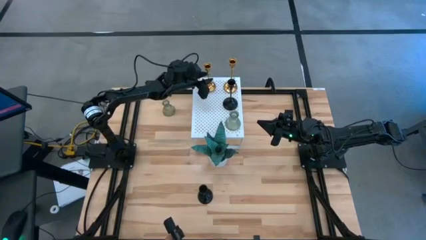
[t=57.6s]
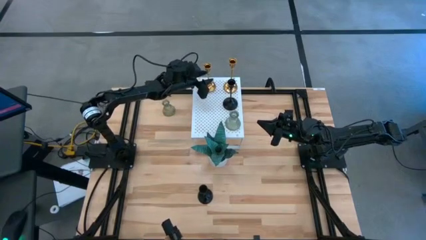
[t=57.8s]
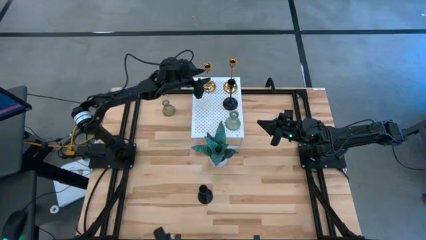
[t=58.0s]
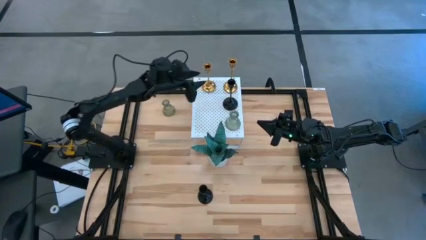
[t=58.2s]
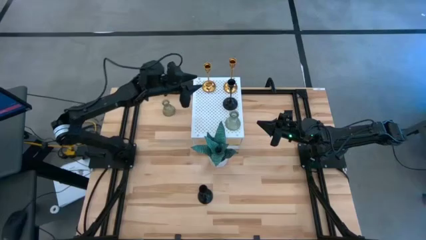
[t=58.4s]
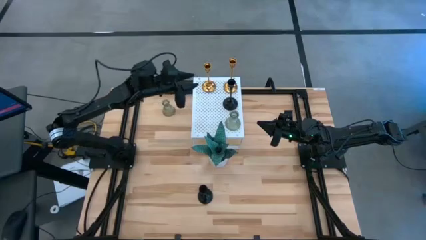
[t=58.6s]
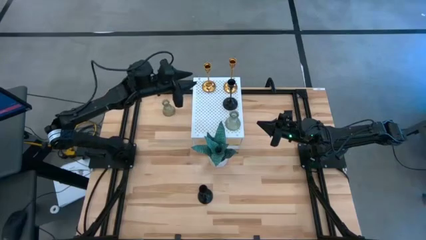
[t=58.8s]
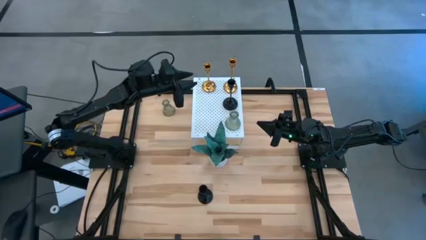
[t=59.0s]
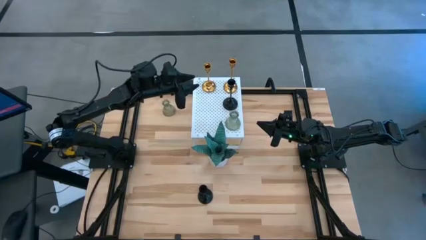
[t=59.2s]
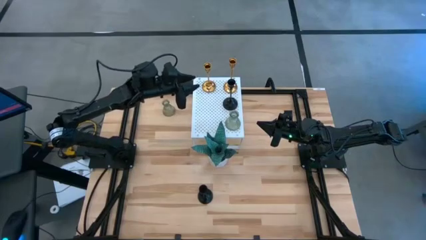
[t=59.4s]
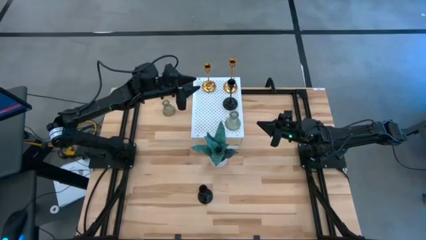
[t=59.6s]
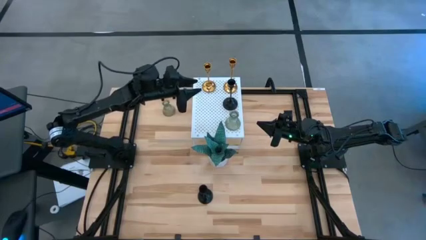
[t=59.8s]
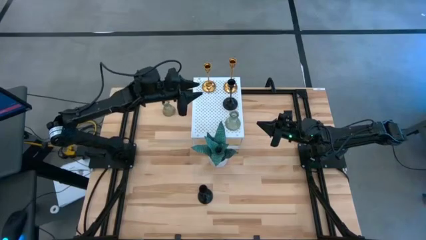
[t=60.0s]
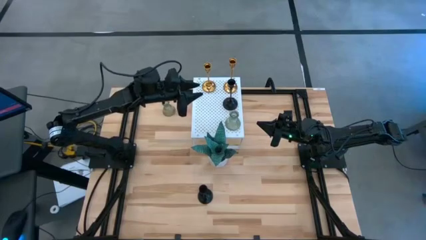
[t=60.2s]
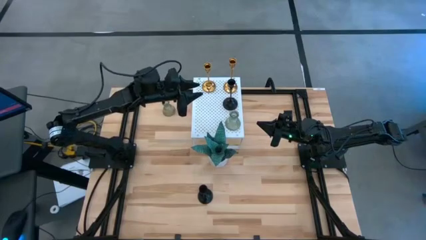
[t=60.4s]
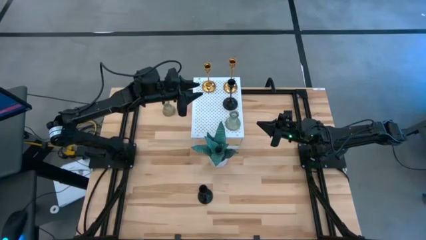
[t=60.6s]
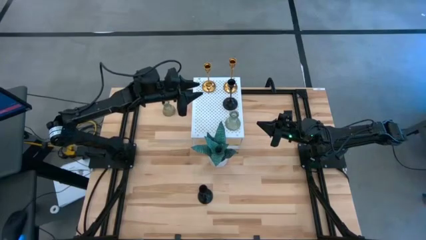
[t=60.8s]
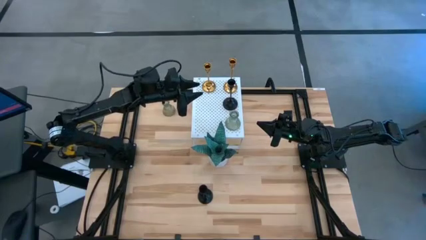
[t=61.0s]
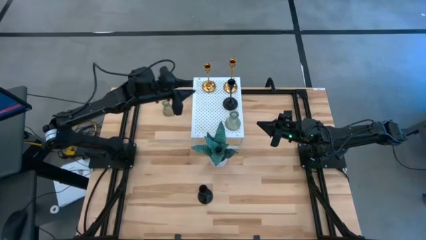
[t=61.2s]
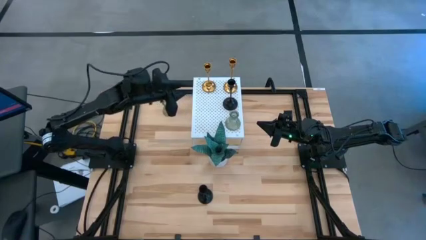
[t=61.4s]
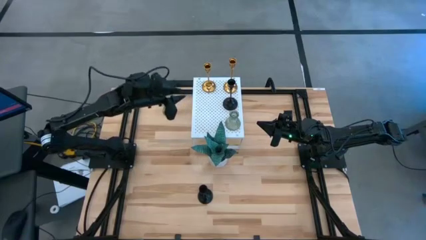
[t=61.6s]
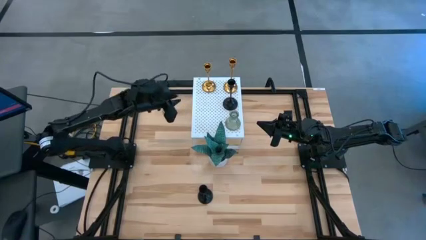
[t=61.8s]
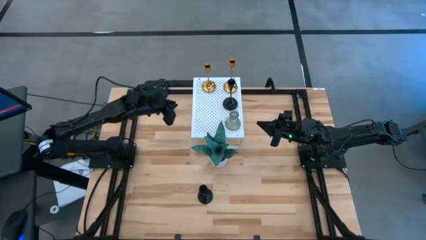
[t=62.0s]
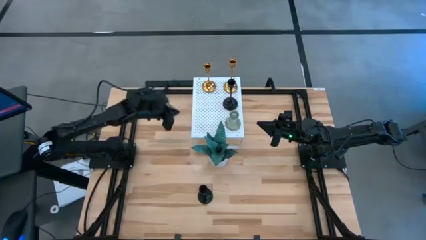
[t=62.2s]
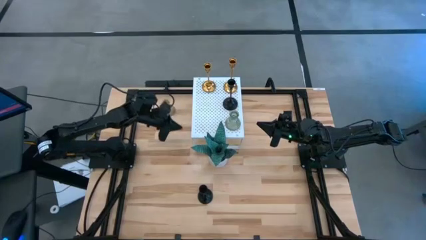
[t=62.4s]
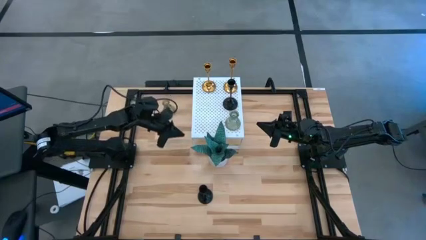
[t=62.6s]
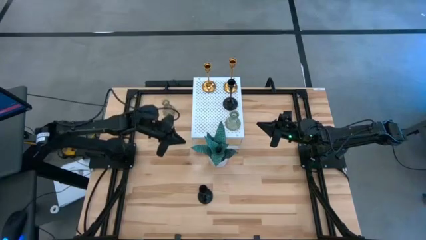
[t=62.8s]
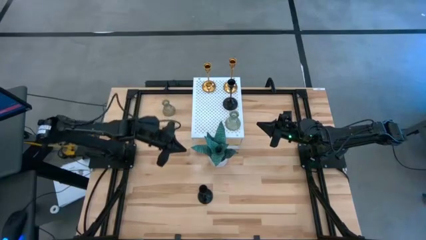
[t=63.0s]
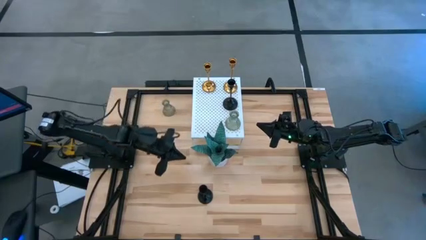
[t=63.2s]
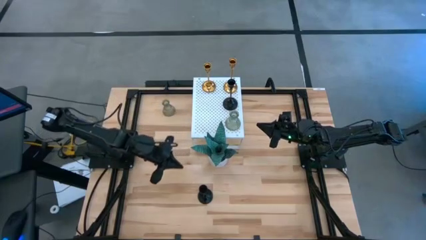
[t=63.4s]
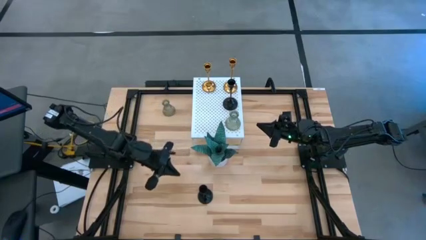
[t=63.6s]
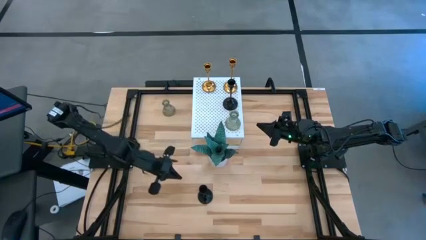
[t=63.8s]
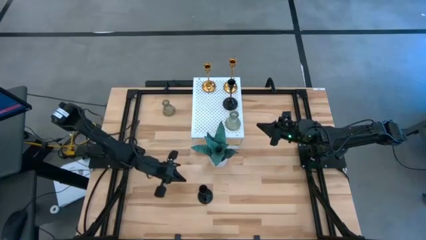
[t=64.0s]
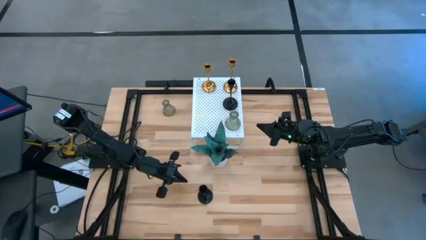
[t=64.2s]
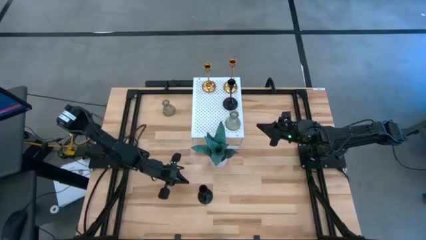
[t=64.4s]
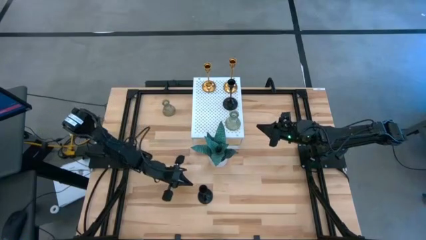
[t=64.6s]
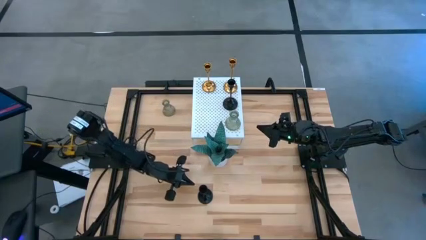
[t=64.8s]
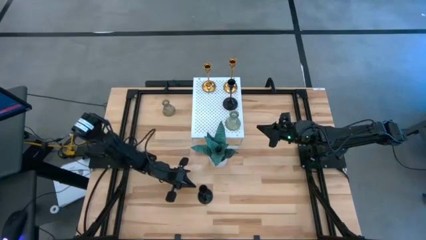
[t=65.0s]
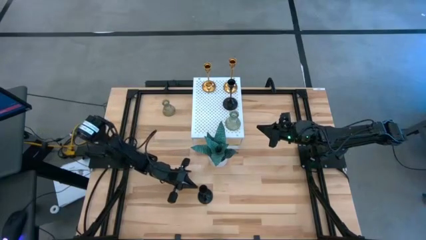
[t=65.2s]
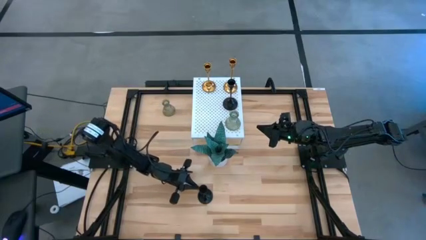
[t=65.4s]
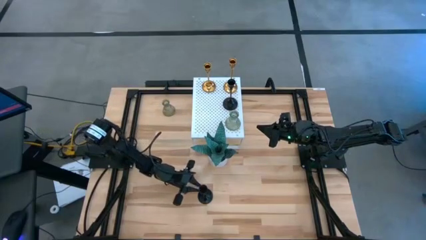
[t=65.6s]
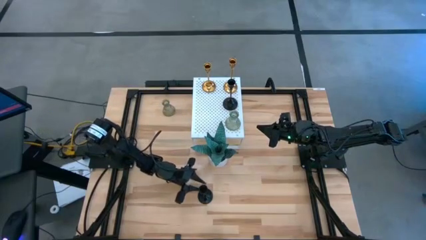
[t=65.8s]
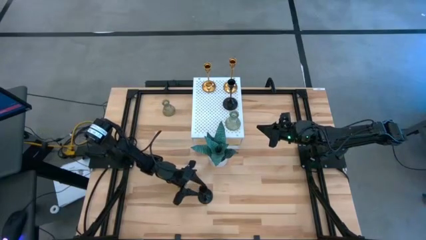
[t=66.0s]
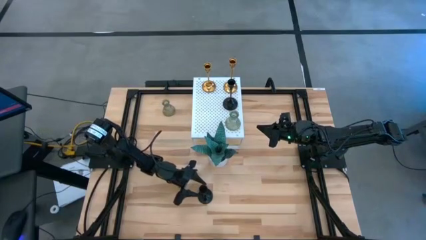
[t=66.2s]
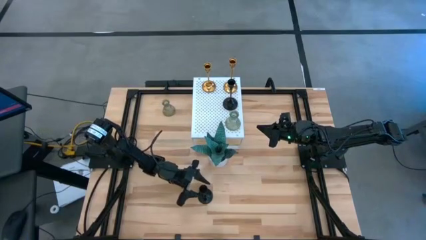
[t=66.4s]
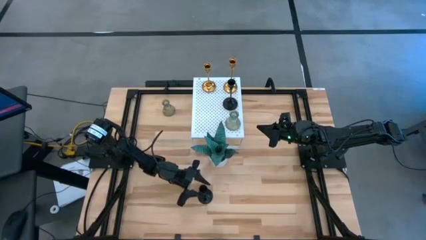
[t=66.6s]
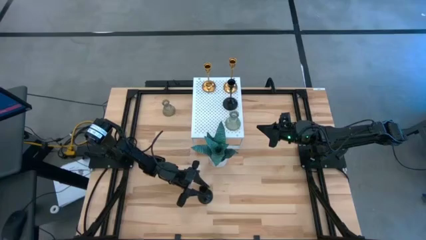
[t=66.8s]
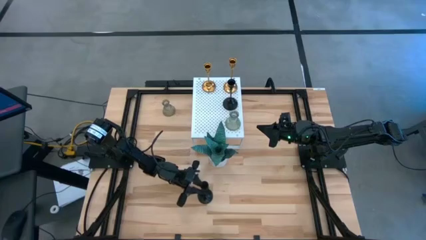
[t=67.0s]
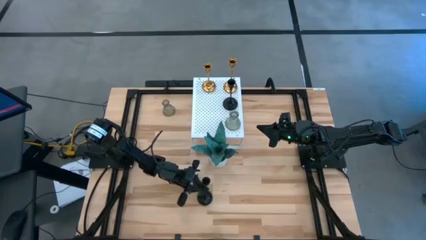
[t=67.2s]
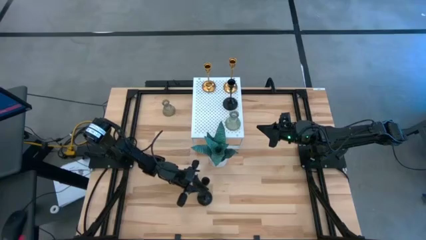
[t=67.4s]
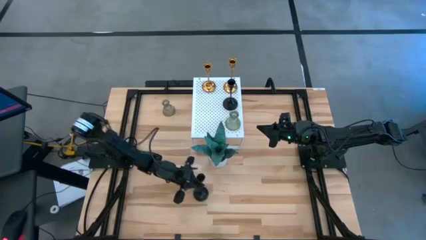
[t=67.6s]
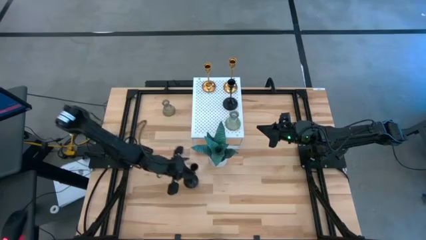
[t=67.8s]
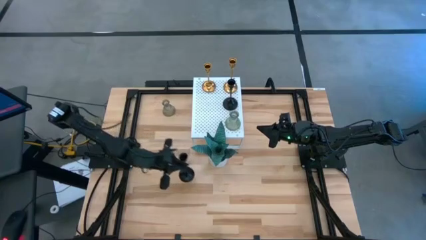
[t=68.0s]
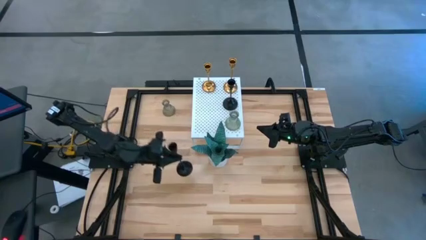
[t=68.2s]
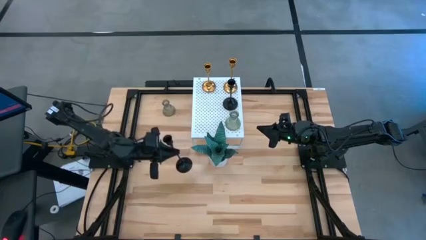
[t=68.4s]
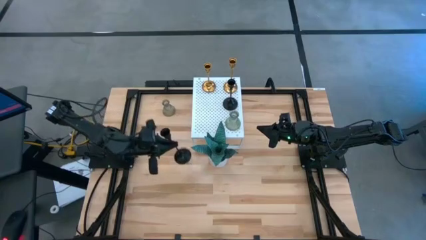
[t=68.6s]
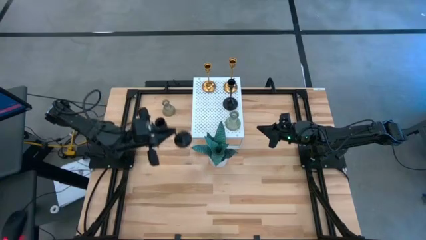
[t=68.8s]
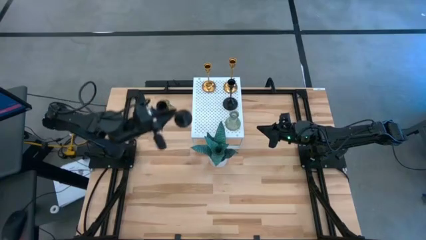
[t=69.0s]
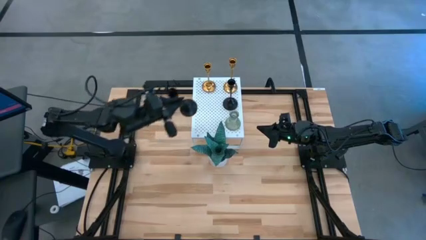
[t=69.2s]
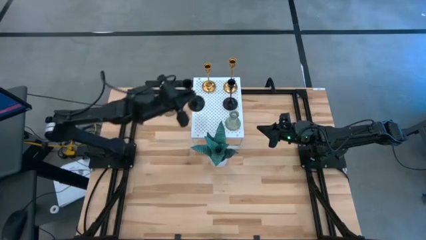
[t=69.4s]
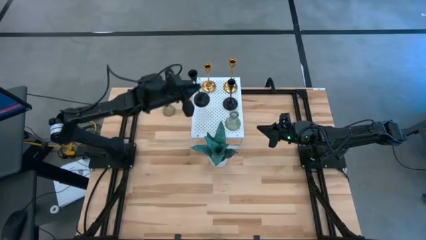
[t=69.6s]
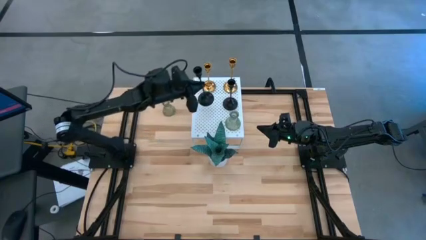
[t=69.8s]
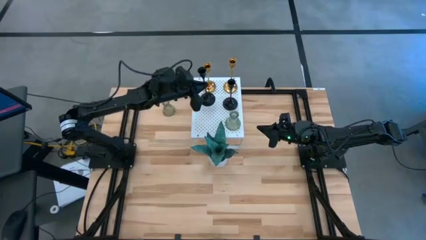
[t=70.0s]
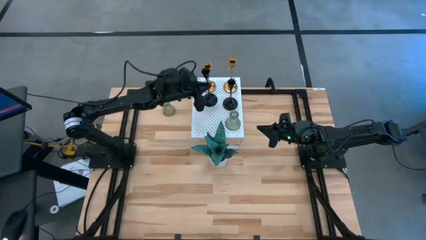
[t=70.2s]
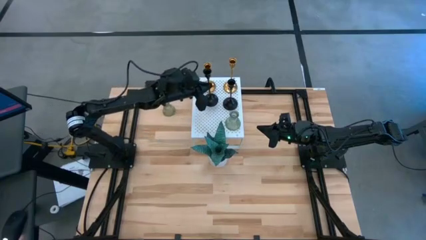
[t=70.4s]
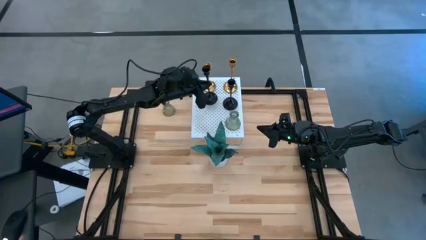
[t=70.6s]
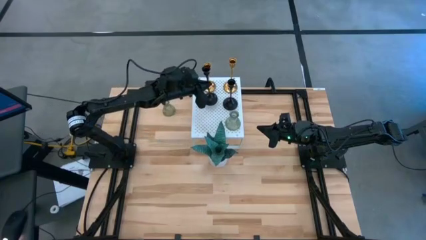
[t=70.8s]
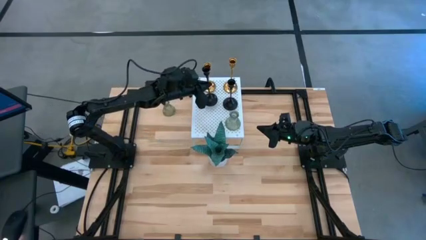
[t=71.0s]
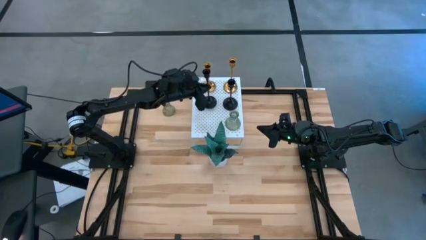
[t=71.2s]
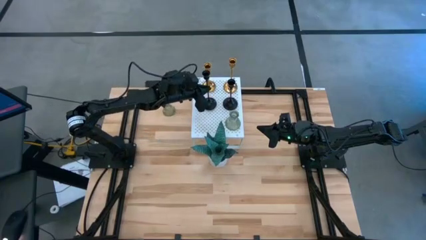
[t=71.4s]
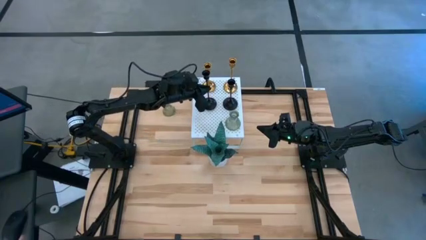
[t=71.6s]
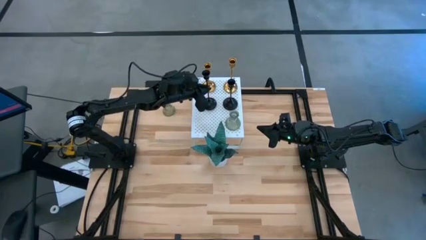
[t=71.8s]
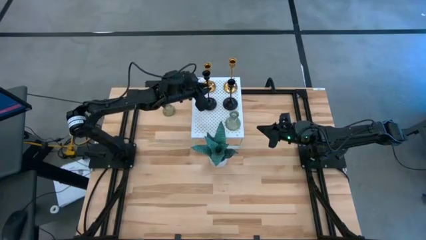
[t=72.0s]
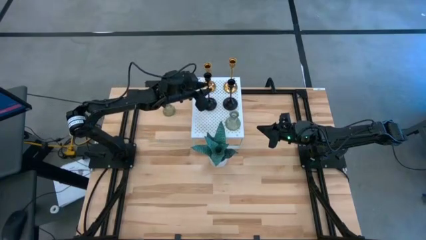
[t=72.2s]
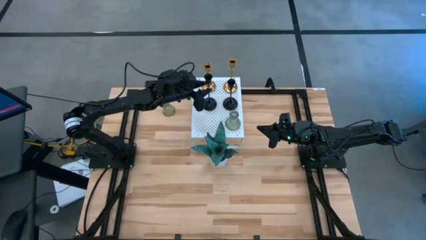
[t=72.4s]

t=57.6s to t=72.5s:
Task: Pick & Place candle stick holders
Put the black candle holder on the shelf aligned with the other black candle holder
